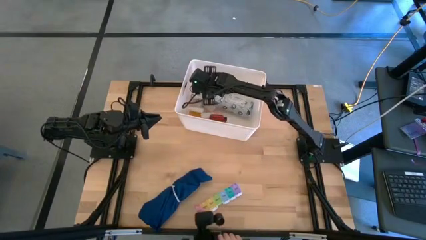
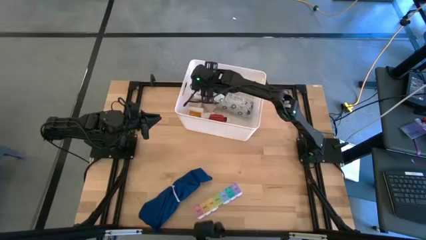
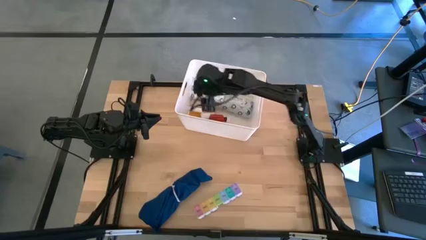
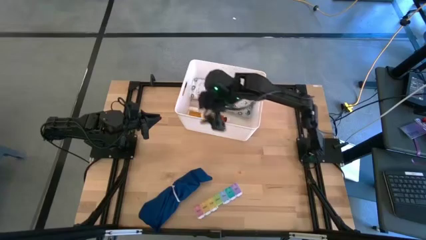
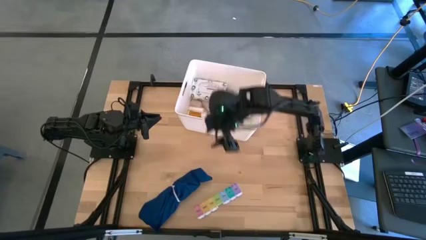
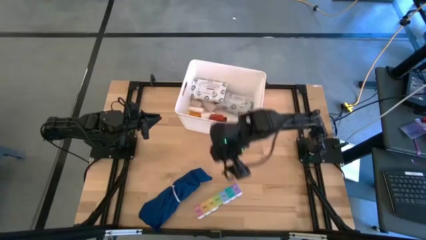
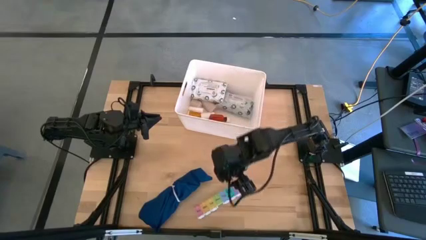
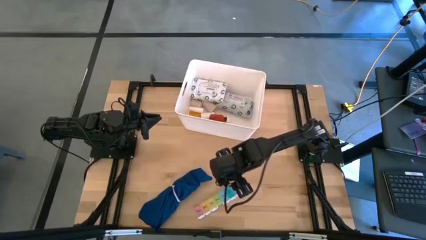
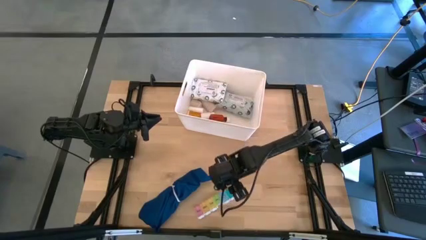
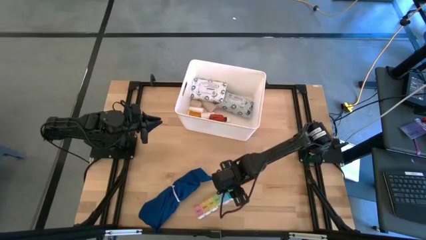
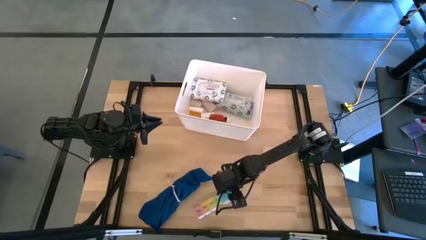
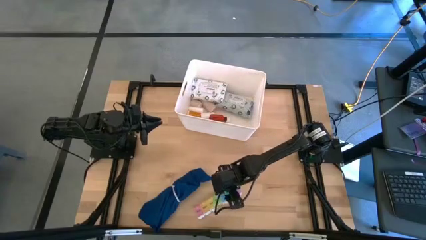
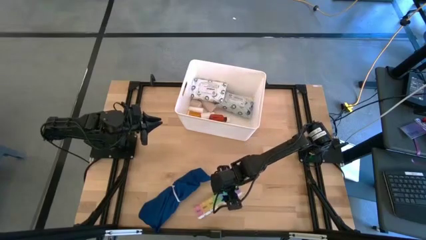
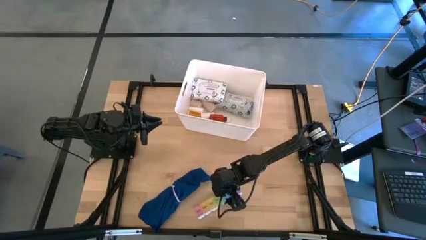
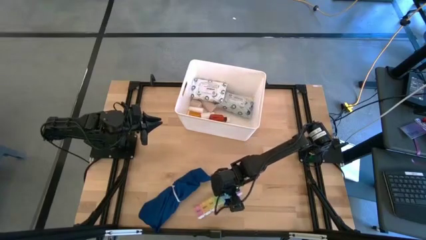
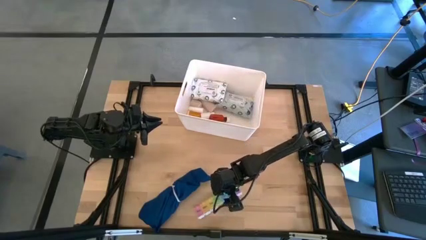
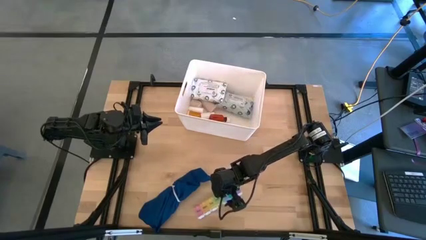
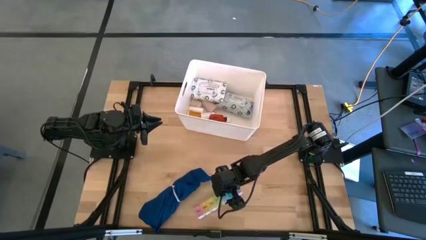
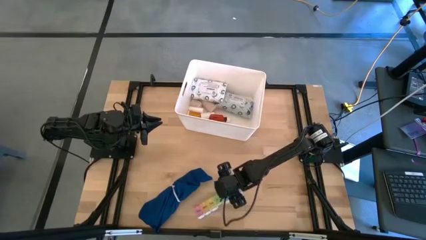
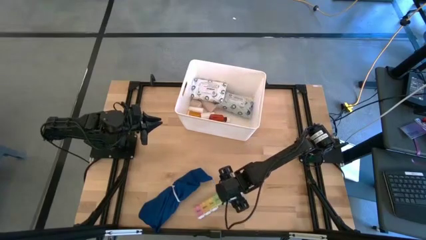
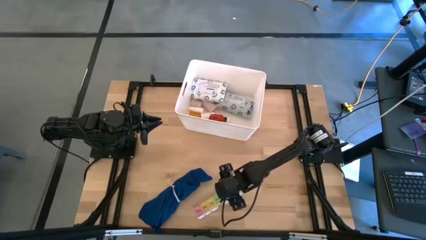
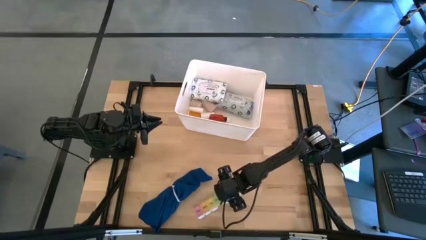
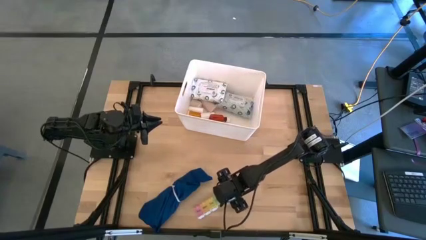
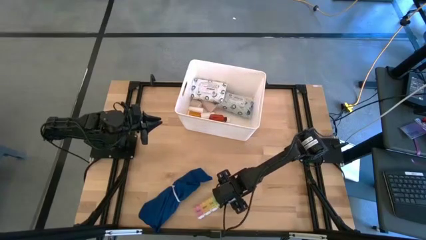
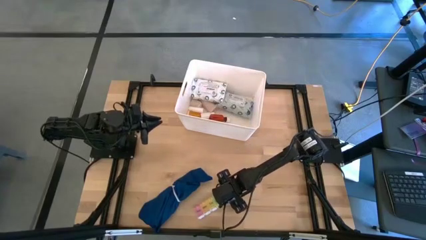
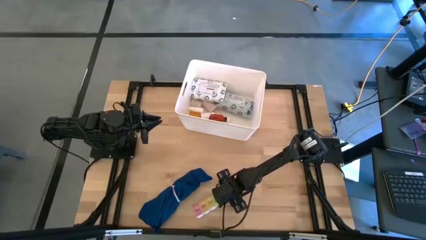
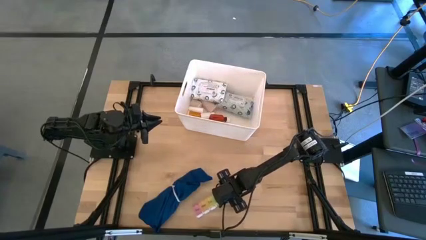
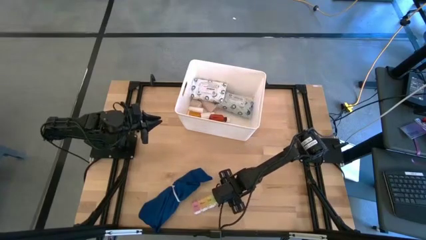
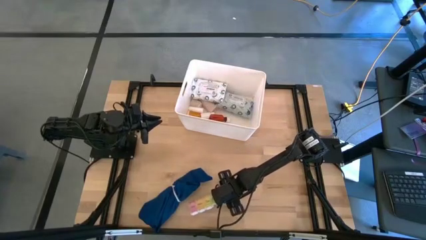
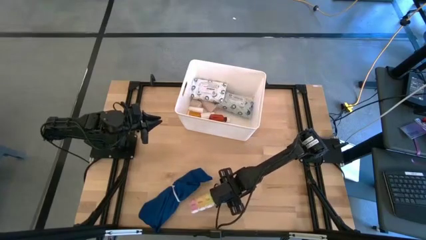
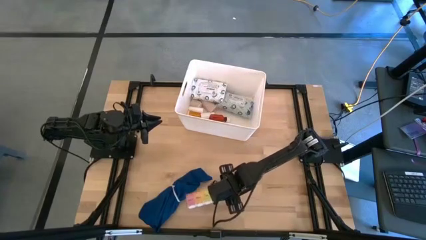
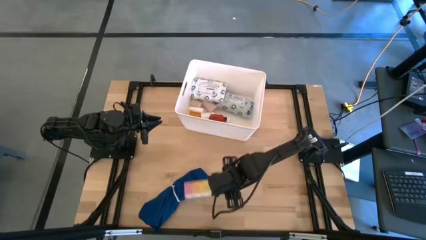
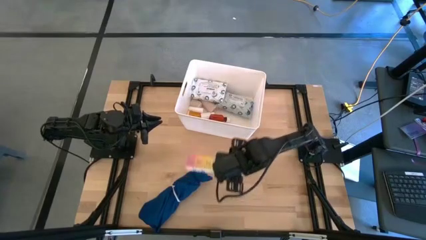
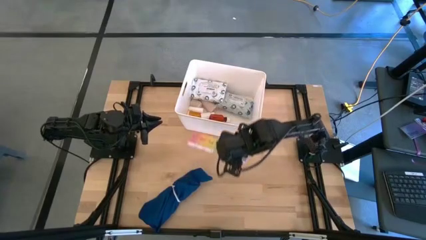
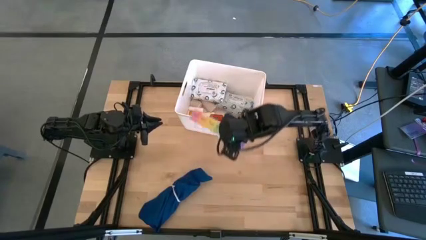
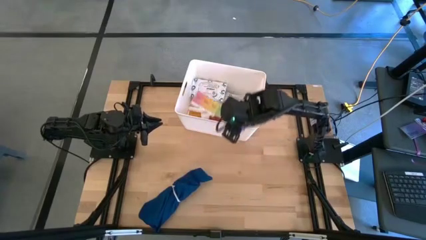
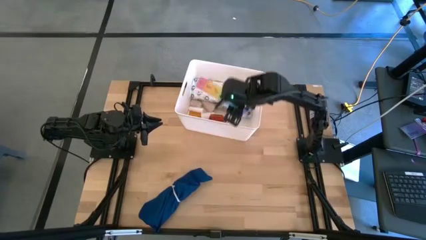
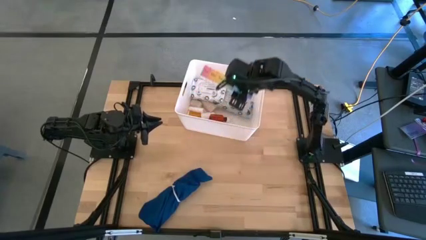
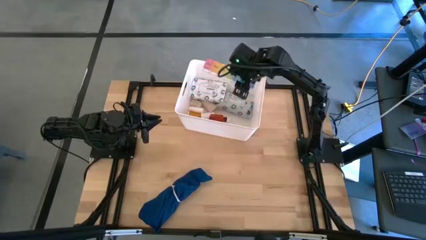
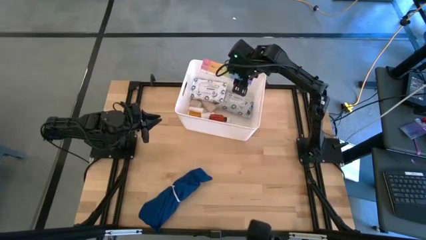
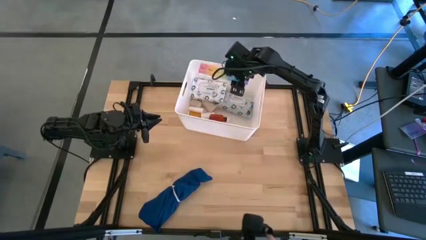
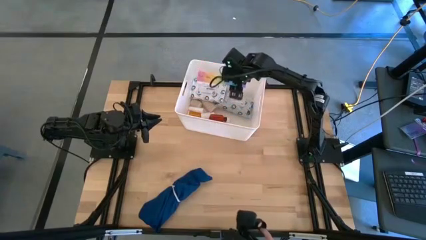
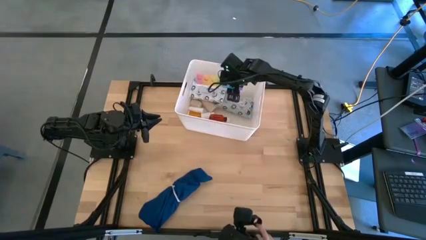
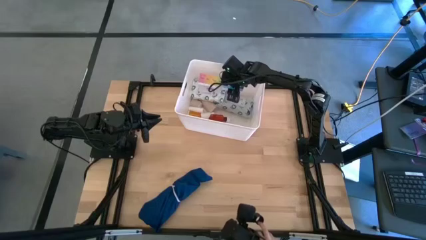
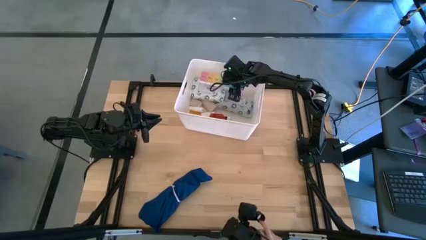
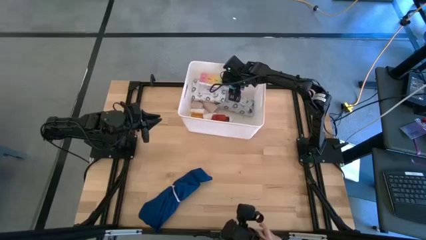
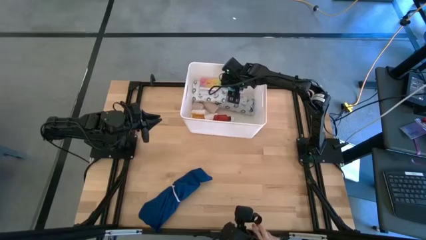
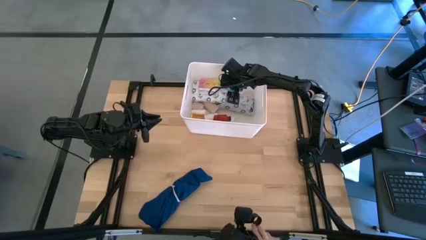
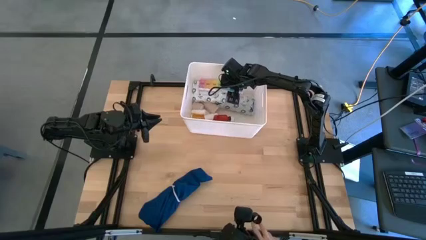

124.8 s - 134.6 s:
Task: Pick & place medical supplies in basket/bin
Put the medicine organizer into the white container

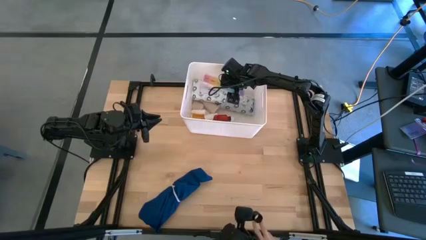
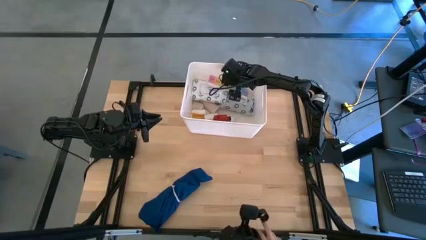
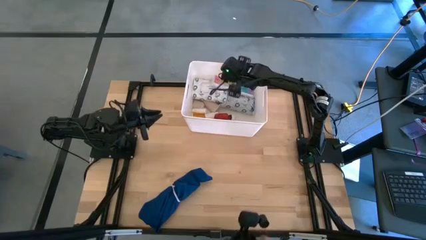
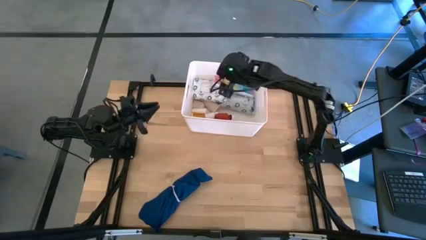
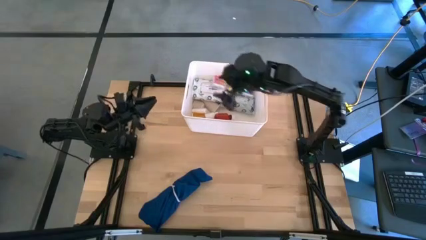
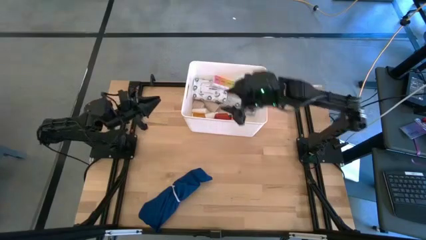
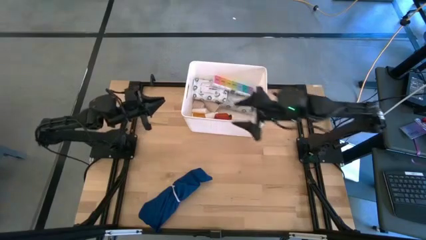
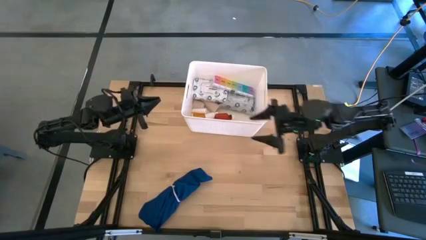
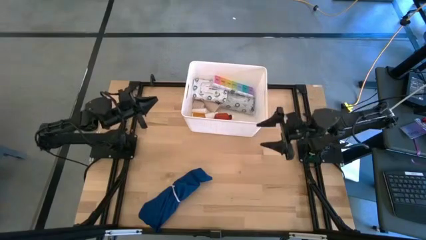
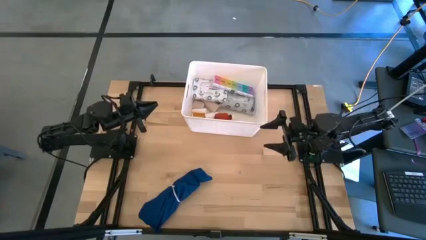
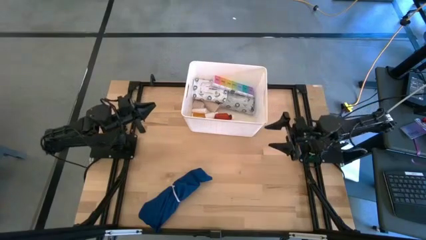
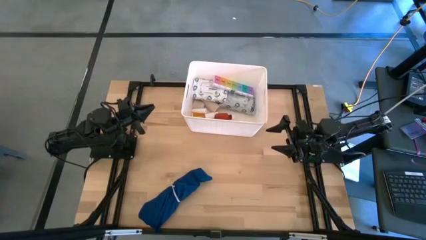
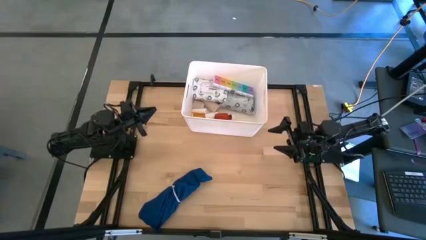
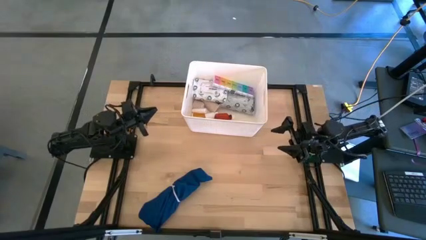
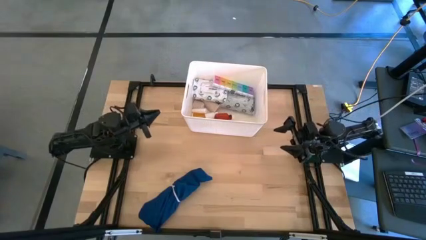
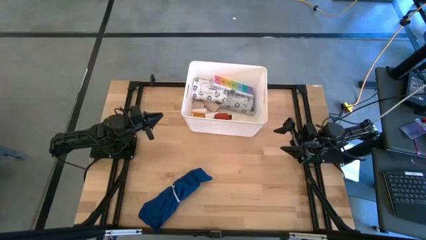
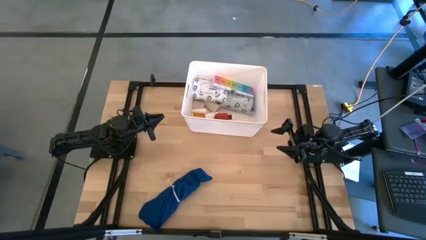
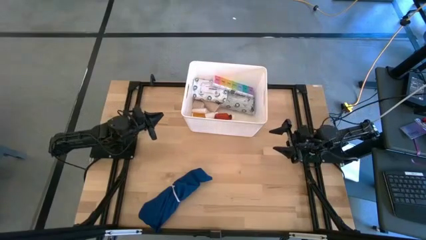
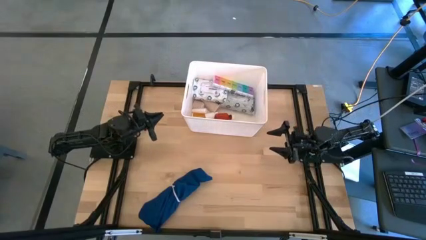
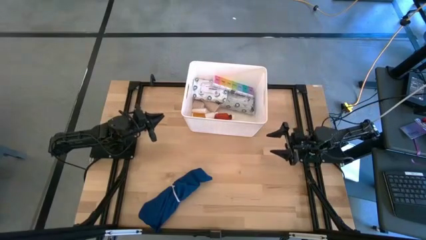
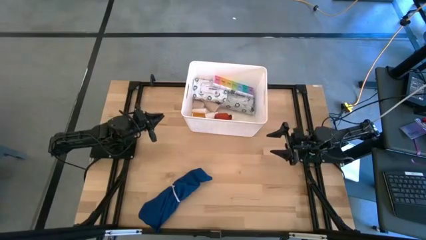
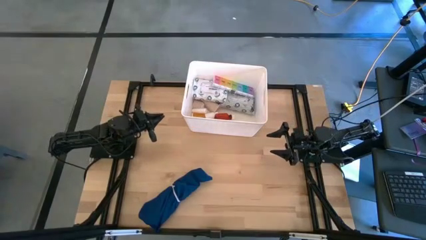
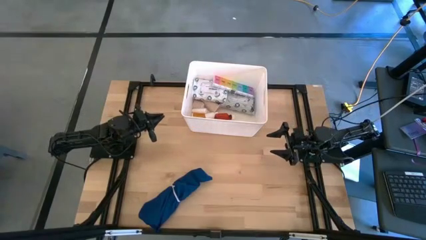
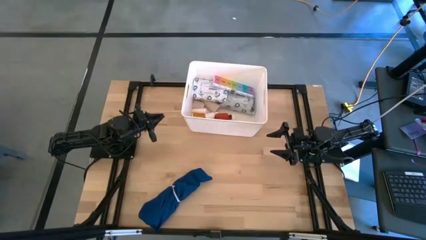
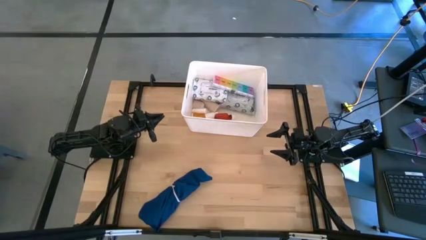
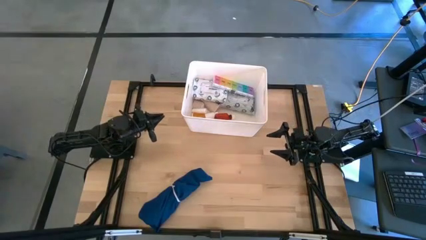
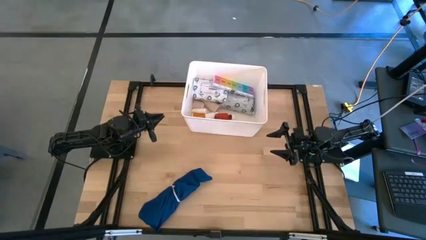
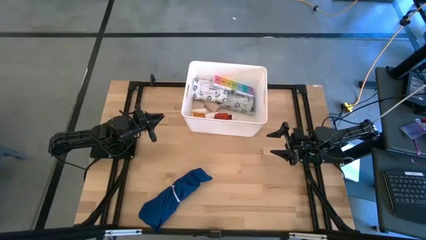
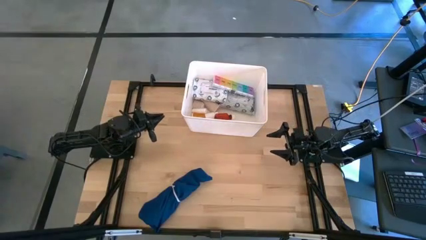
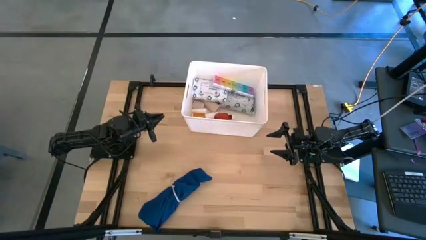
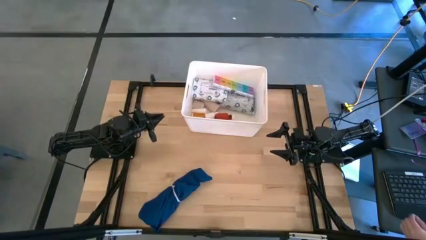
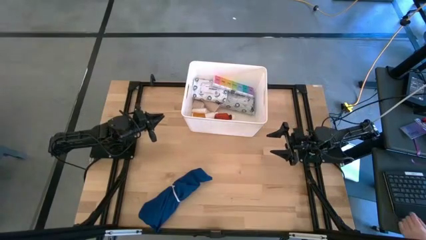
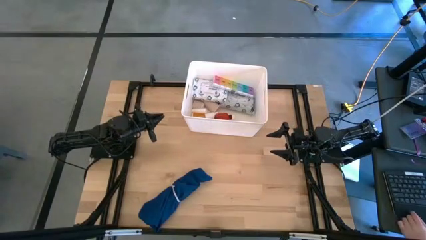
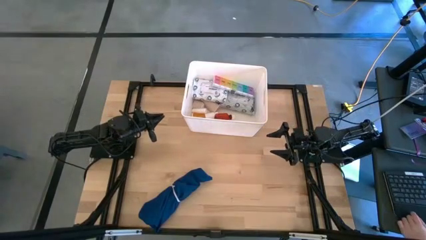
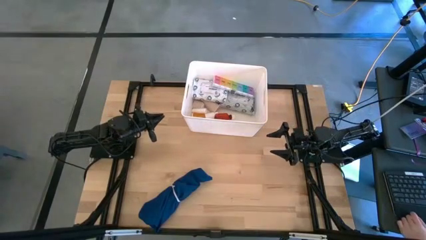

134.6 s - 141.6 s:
Return to Home Position
